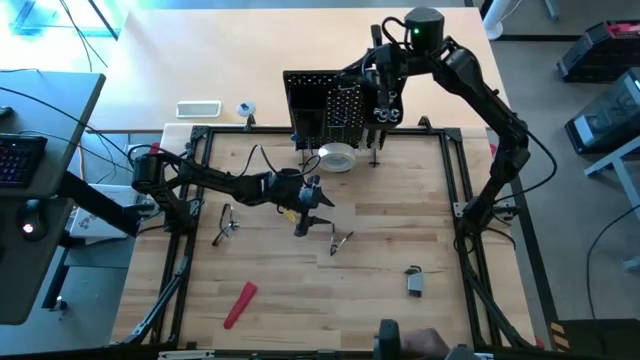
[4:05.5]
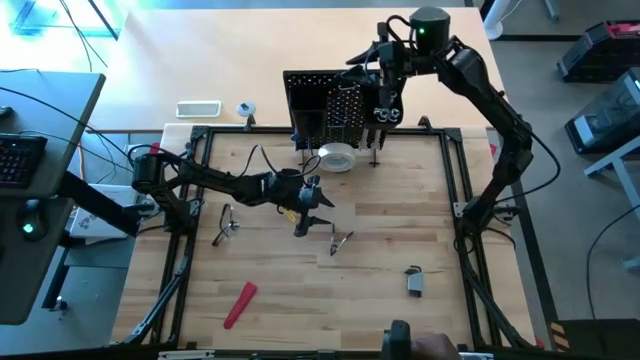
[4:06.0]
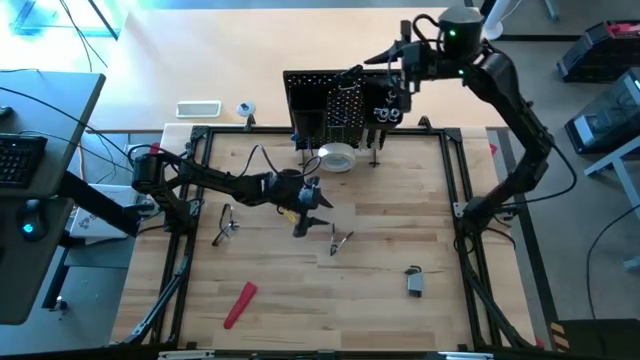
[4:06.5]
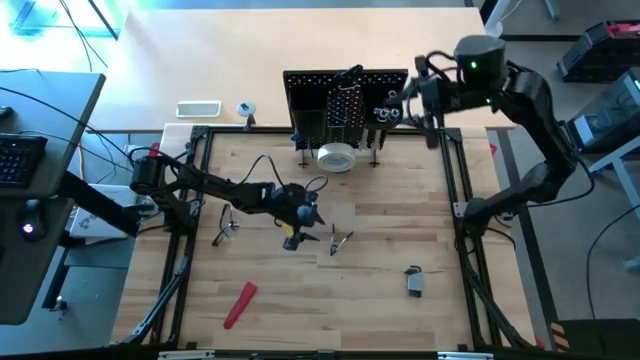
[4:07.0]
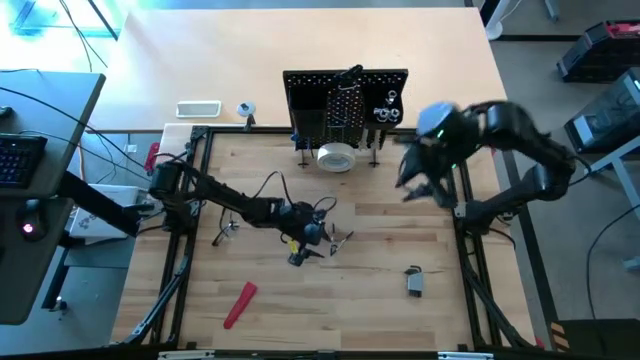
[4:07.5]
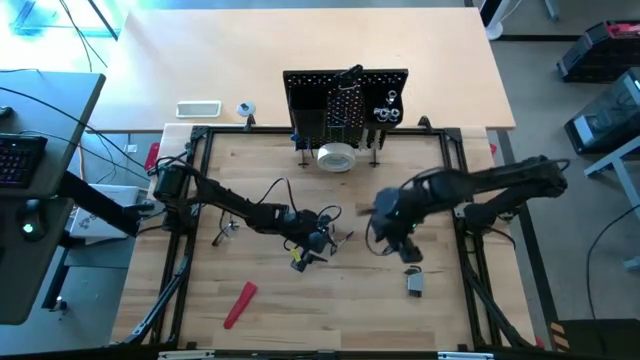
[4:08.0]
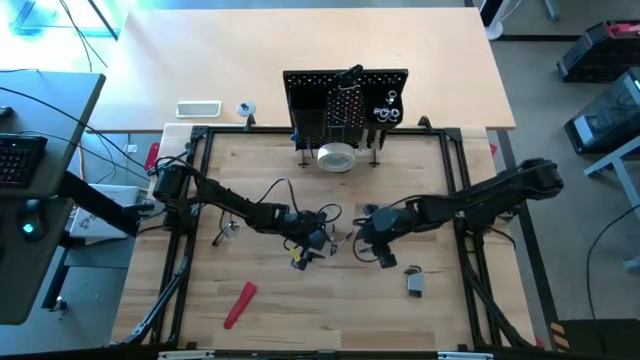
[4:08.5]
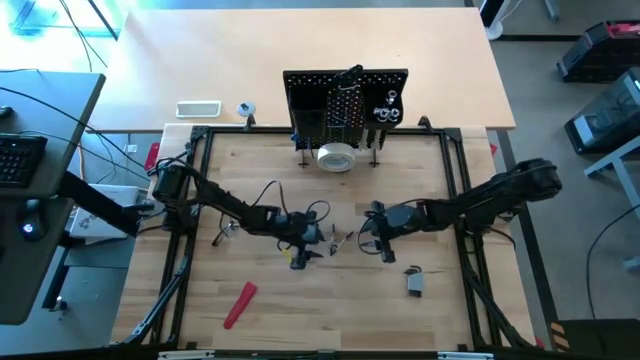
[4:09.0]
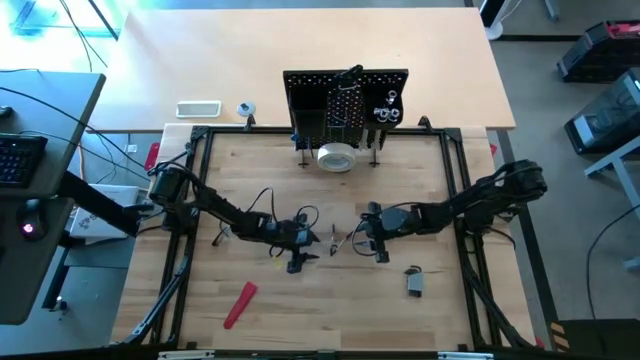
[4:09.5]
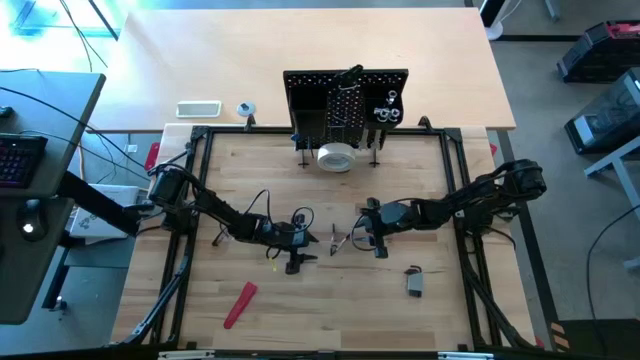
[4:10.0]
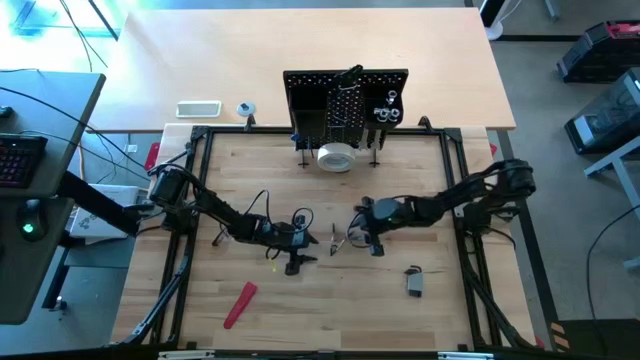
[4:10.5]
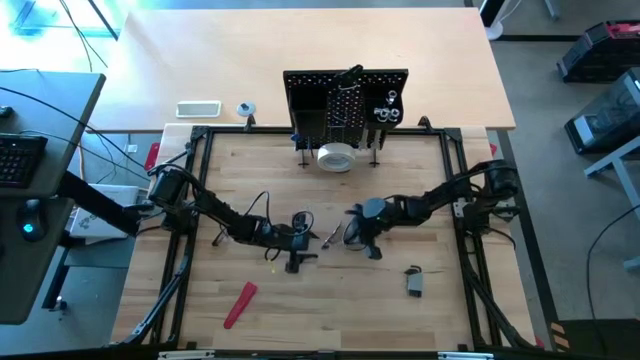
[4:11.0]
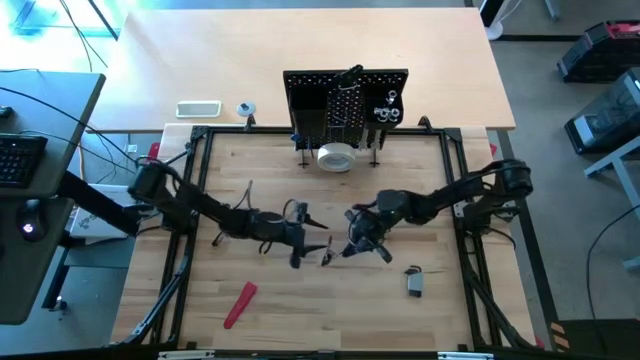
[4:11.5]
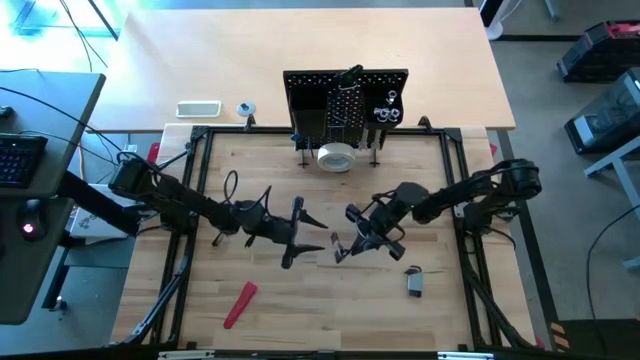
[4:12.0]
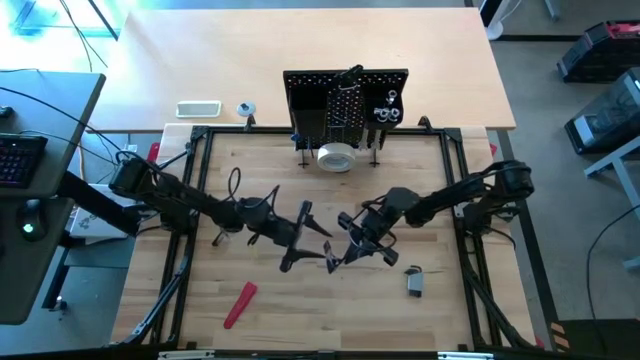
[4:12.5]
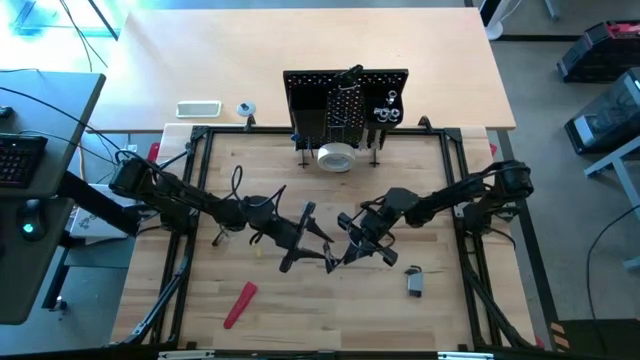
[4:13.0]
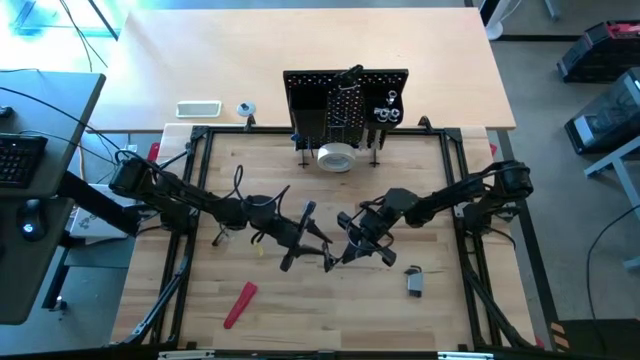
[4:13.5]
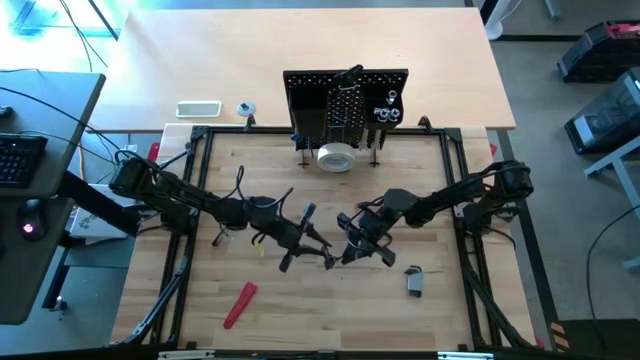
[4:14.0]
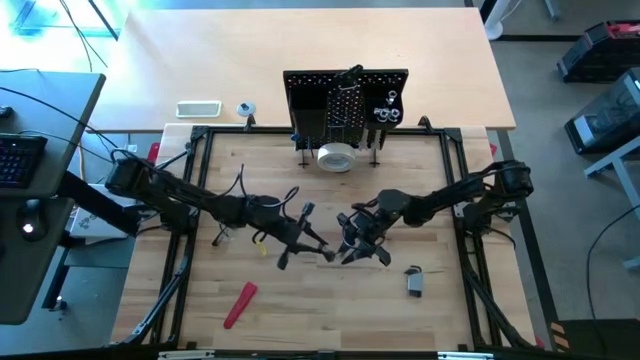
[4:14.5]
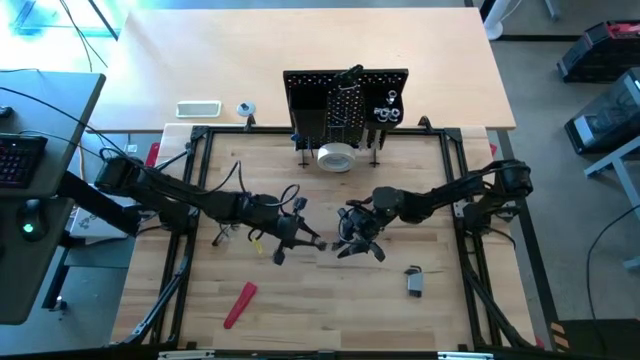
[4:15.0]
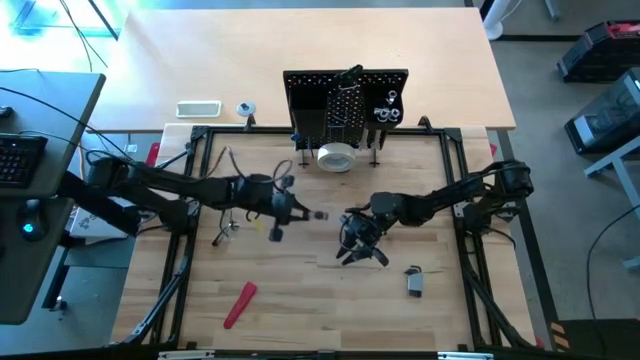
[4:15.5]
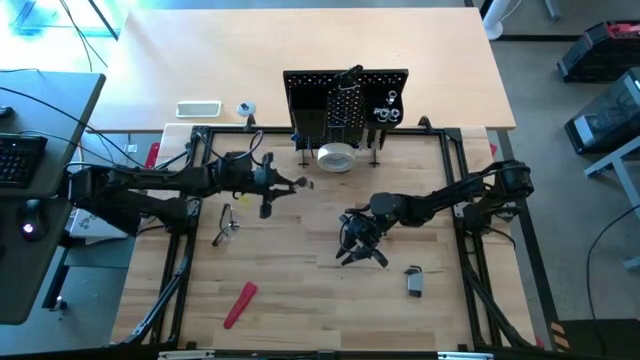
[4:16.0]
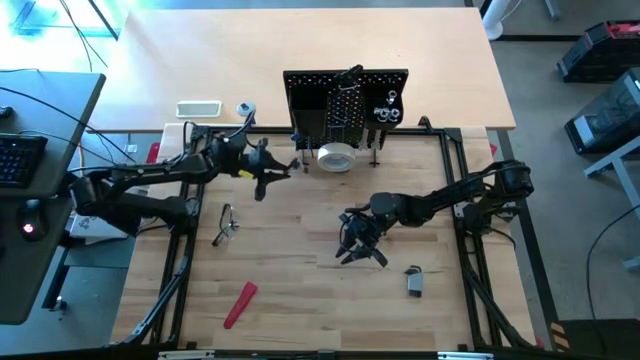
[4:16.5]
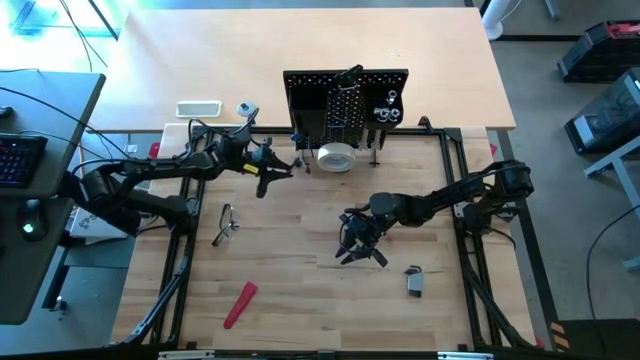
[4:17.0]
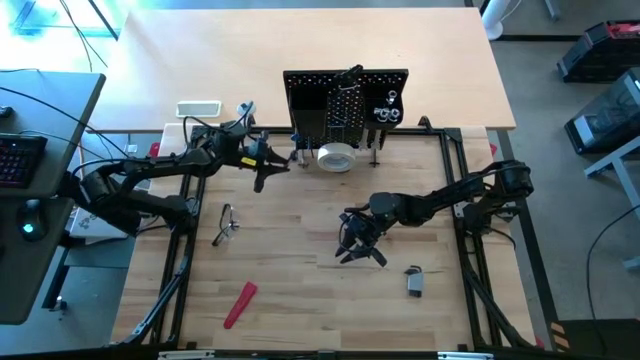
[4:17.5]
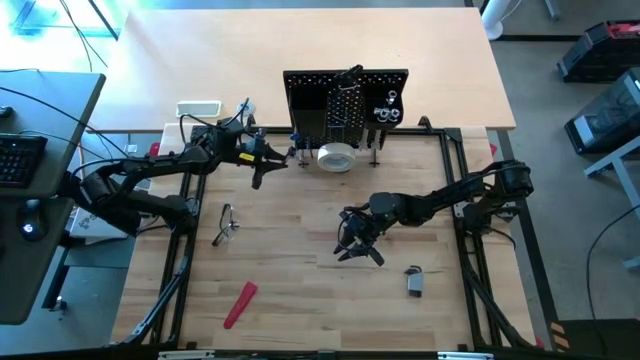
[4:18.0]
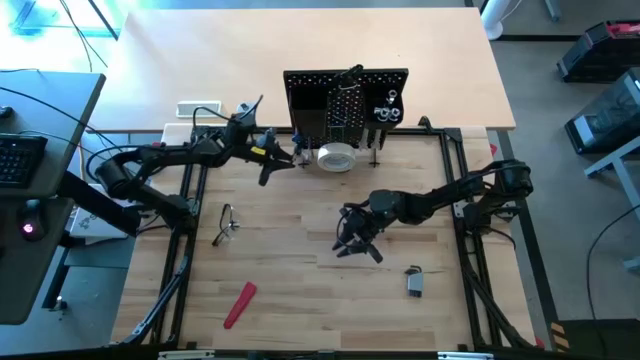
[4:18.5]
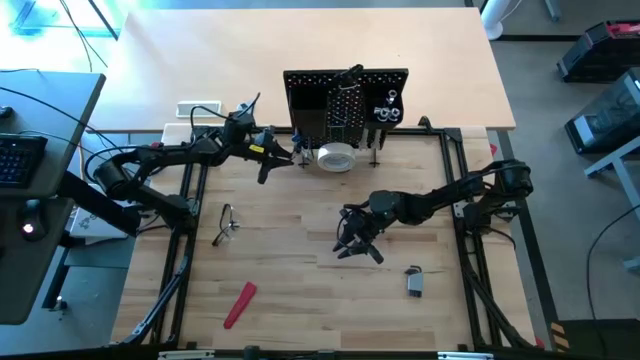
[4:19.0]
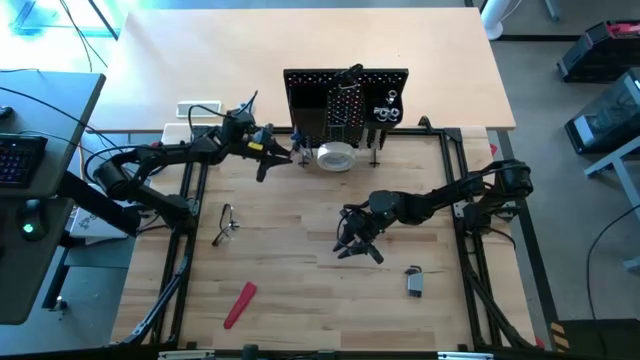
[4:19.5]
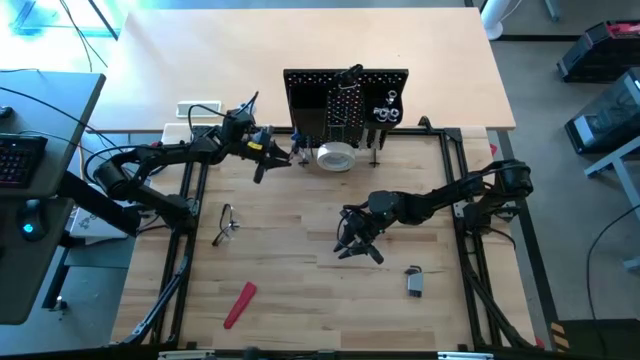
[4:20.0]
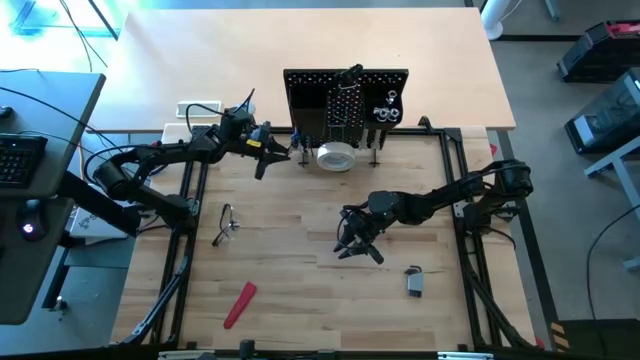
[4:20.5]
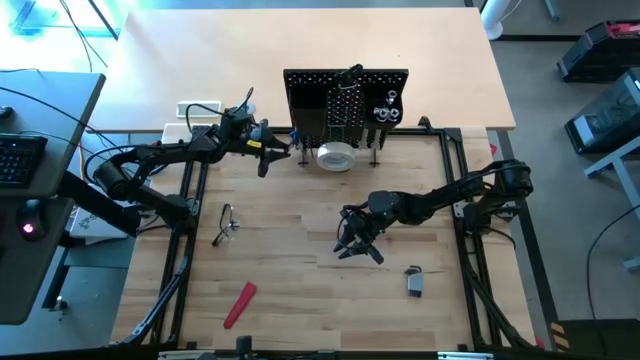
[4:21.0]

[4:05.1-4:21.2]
Task: Hang tools onto peg board
Hang the black spring clamp on the peg board

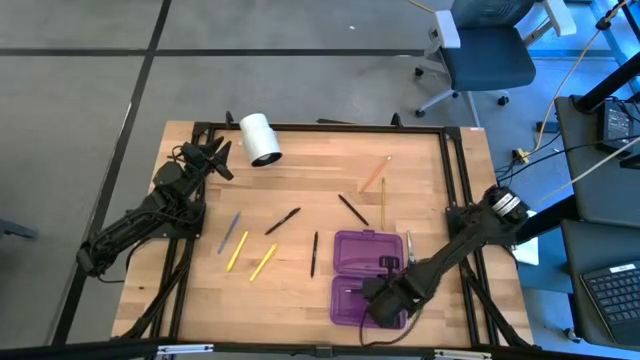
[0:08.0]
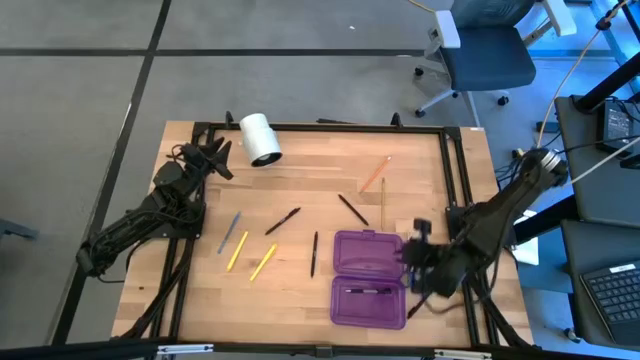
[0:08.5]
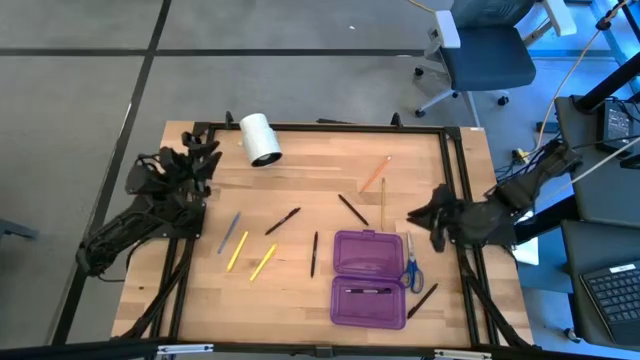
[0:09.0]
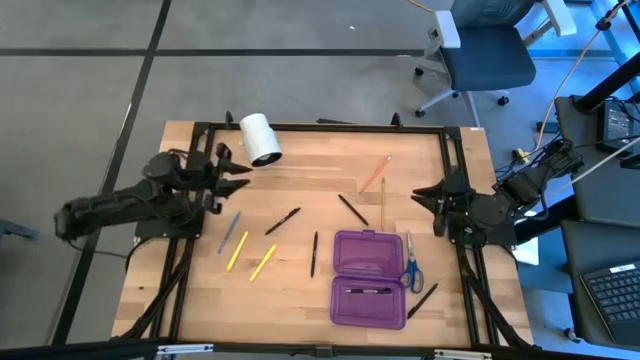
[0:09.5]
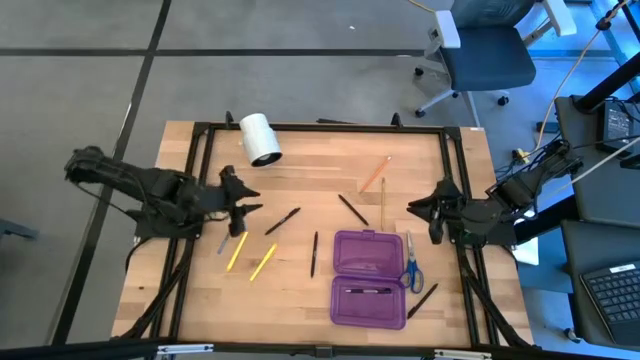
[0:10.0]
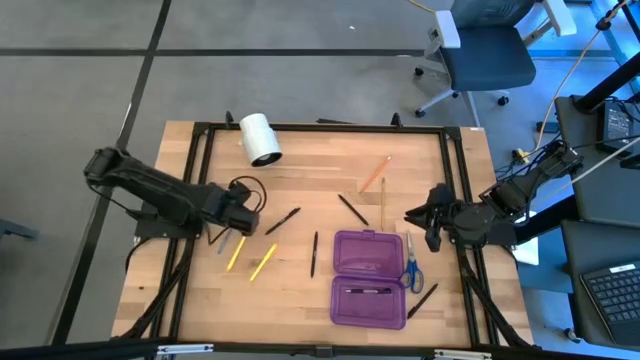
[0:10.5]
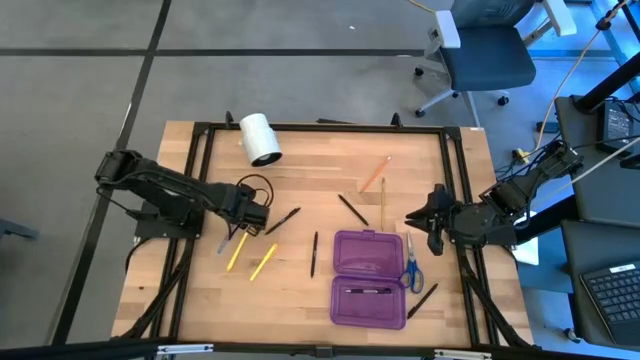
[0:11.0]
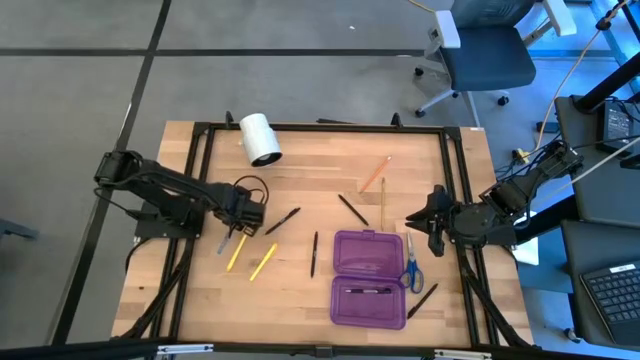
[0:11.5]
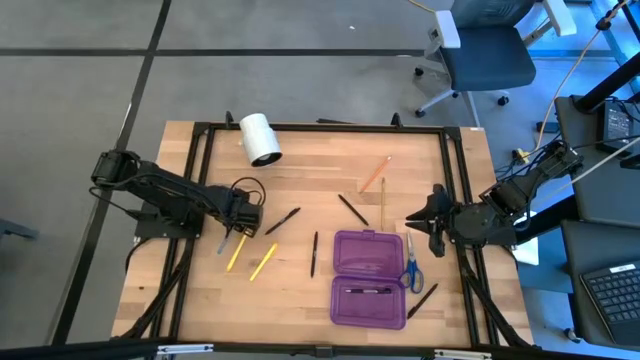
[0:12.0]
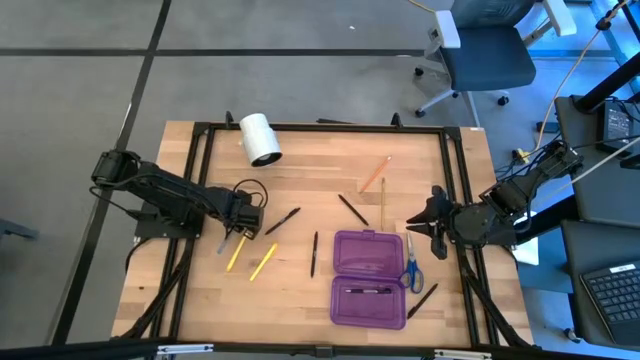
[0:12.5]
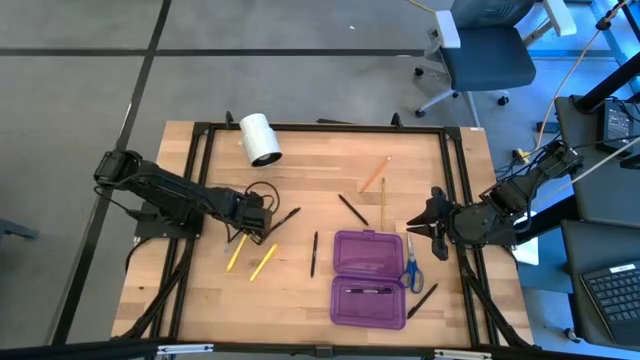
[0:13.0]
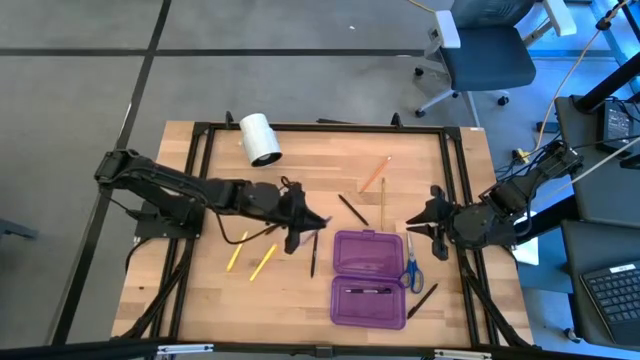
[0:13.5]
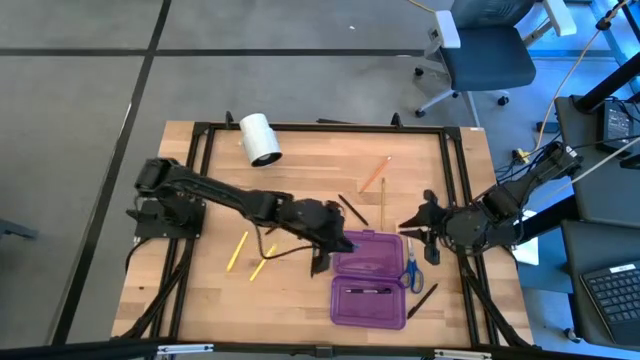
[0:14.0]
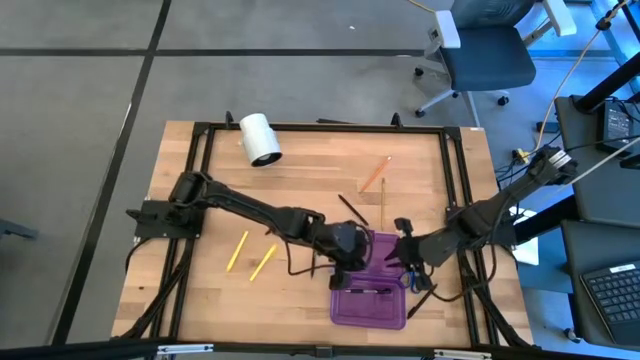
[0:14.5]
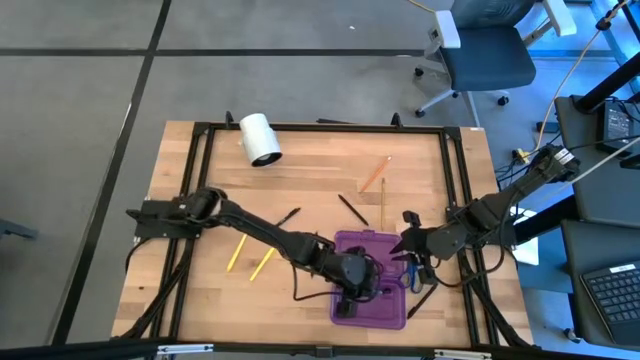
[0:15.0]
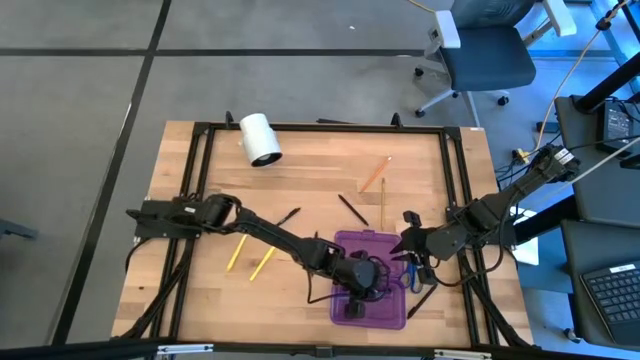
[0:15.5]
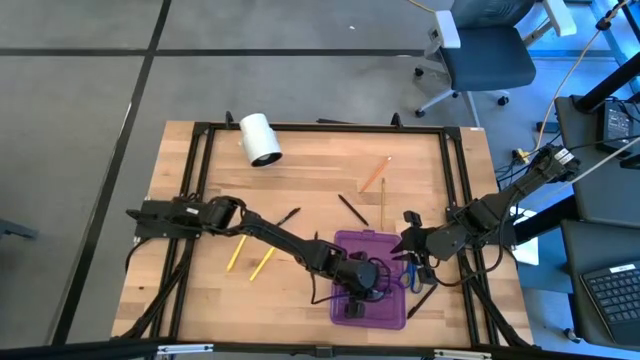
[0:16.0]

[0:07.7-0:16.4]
Task: Pick & place school supplies into a supply box
Put the blue pen into the purple supply box
